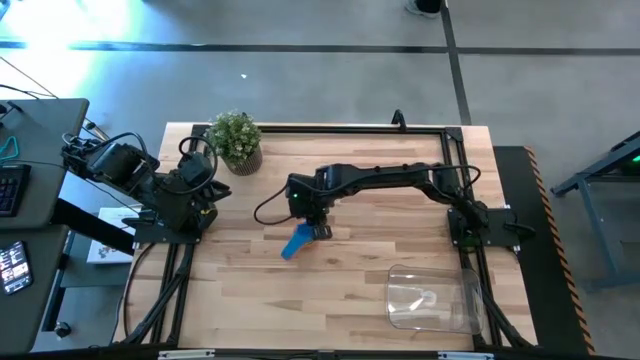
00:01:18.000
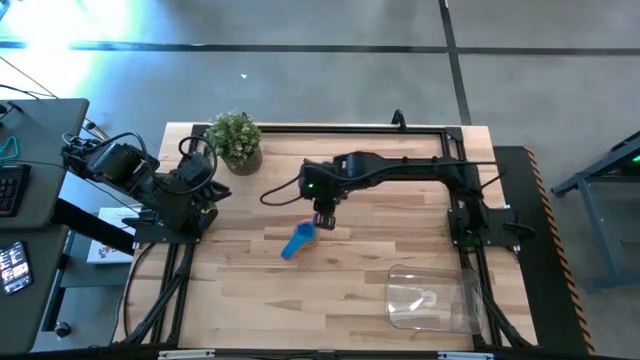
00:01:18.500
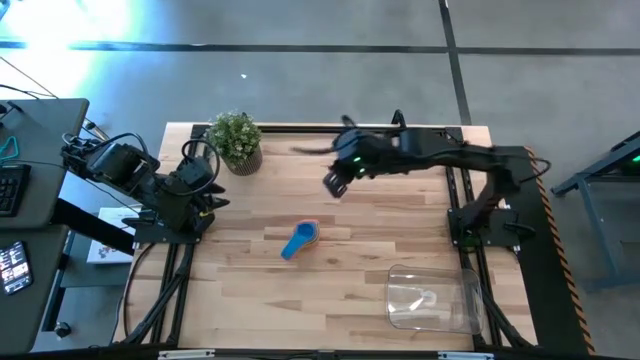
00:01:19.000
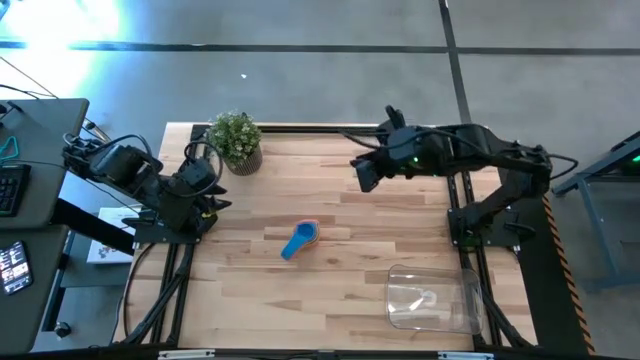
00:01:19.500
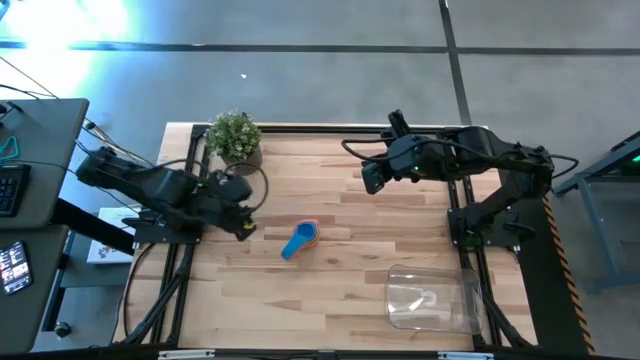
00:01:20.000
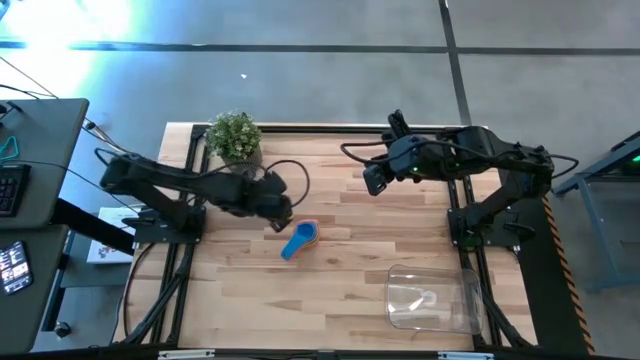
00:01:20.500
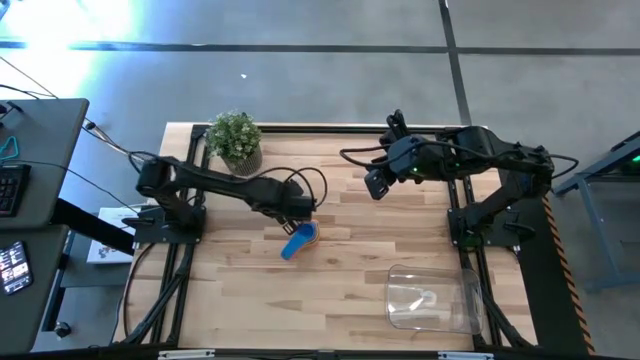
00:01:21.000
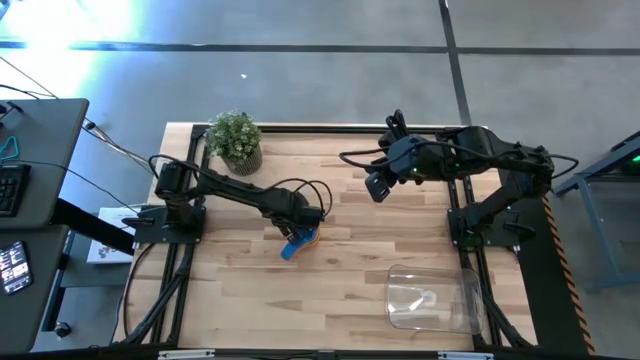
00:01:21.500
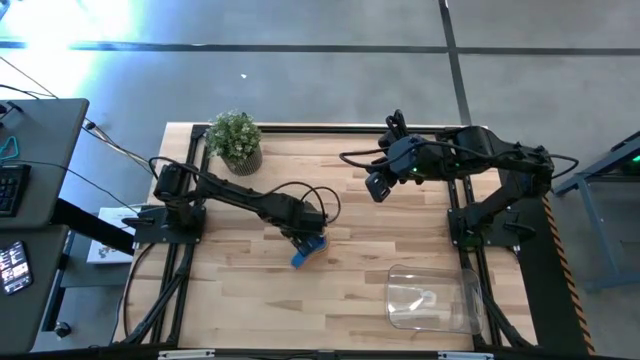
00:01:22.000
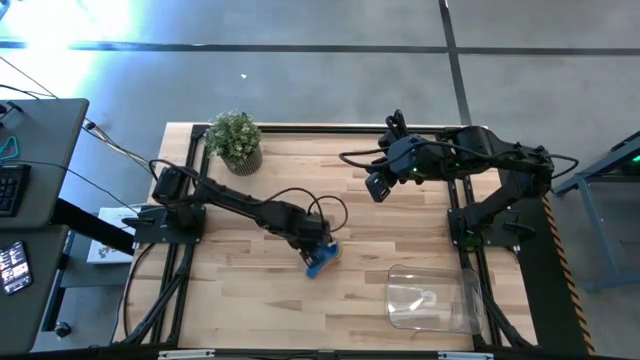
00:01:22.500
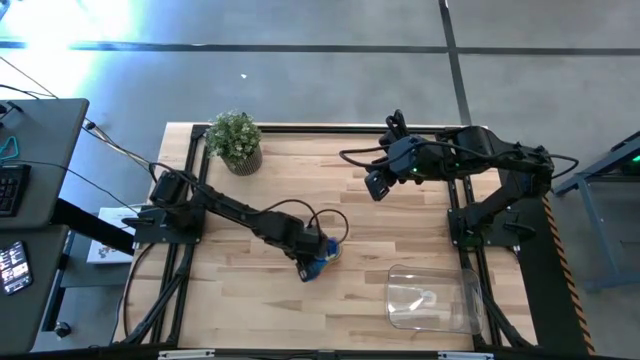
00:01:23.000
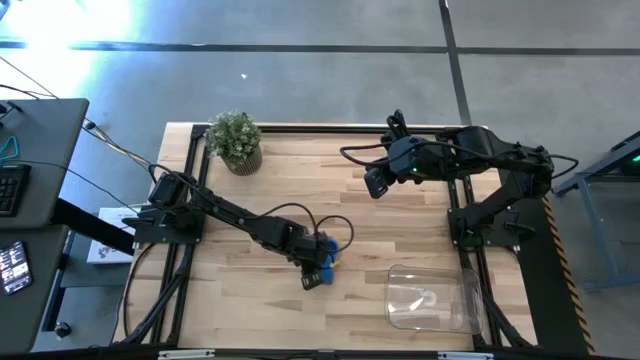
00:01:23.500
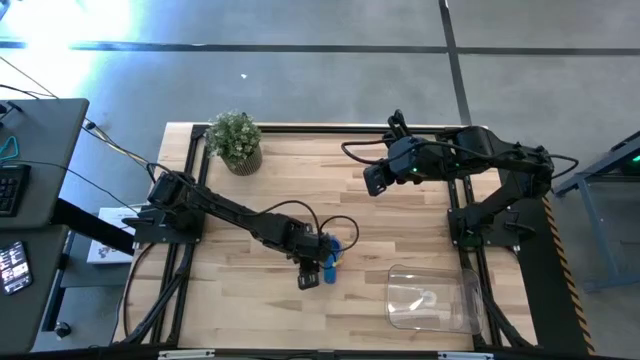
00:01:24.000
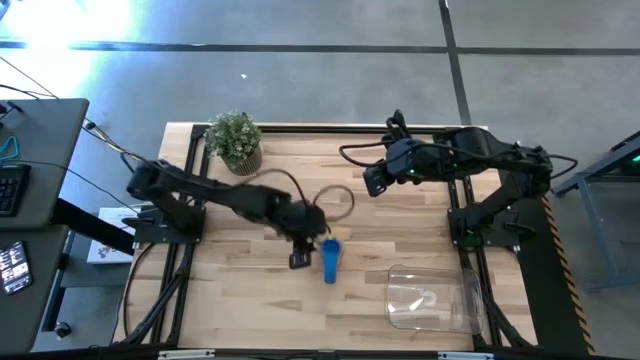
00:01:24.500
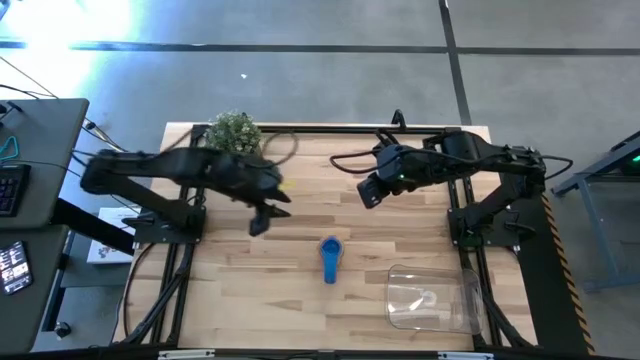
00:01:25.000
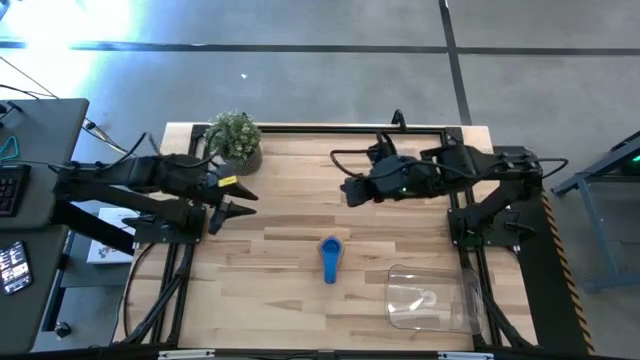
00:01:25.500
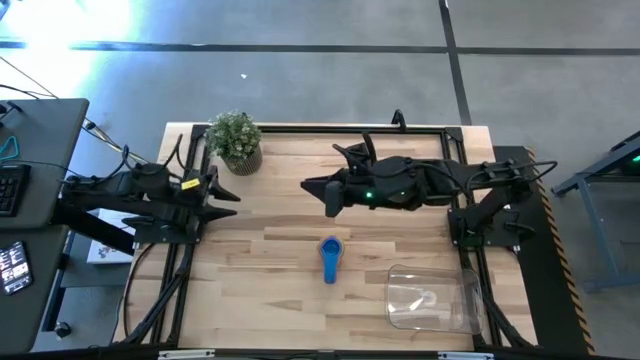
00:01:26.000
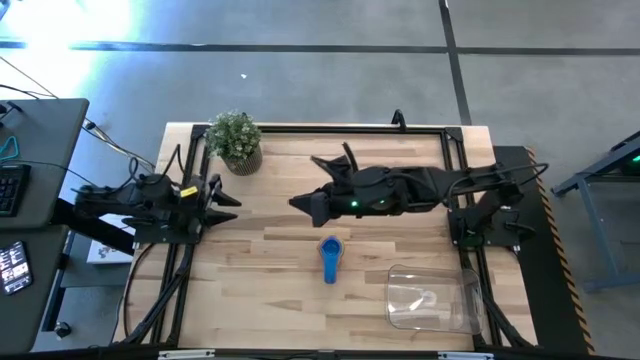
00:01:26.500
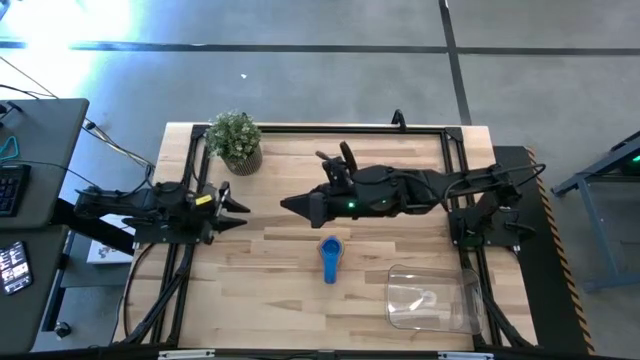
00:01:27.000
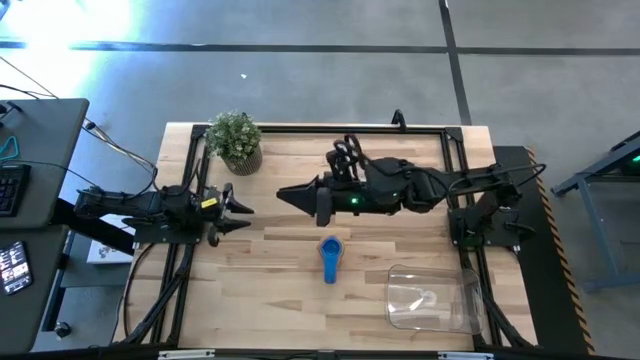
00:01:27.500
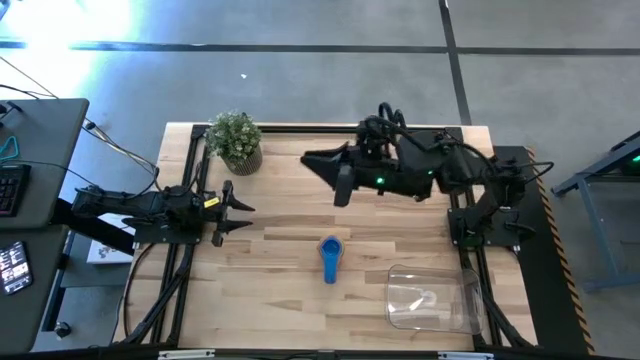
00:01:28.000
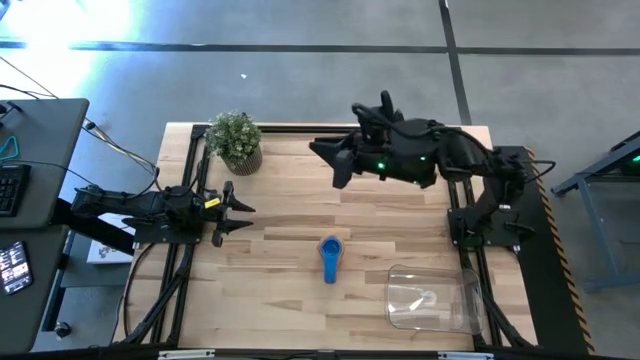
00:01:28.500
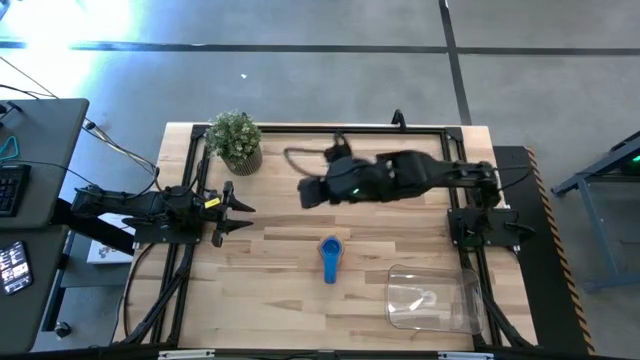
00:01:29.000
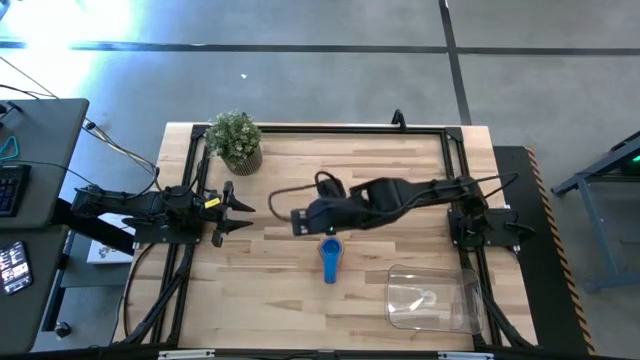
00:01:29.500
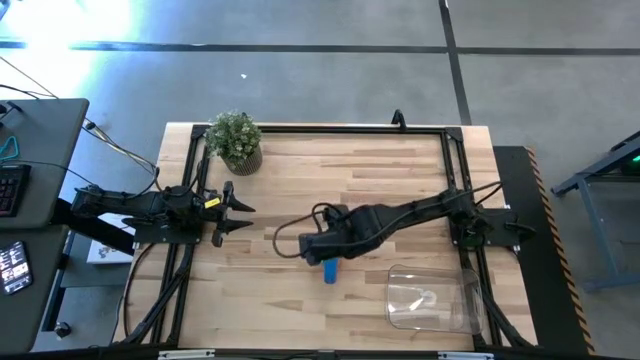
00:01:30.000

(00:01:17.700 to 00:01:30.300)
Task: Nest measuring cups in basket
Put the nested measuring cups into the transparent bin

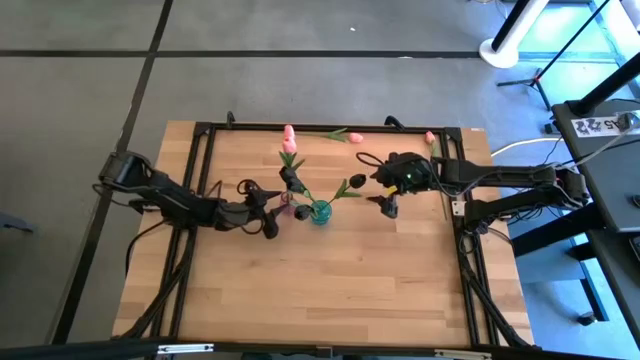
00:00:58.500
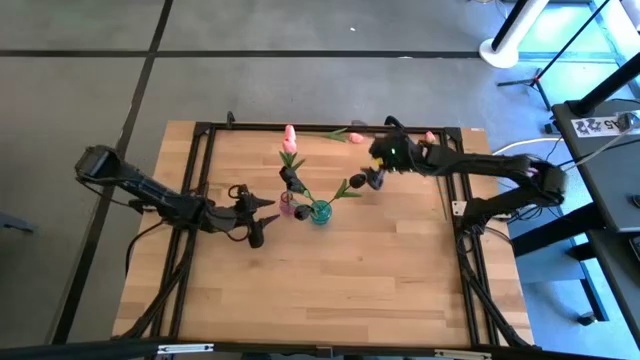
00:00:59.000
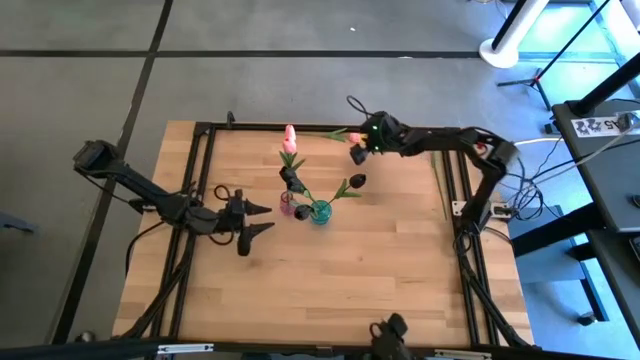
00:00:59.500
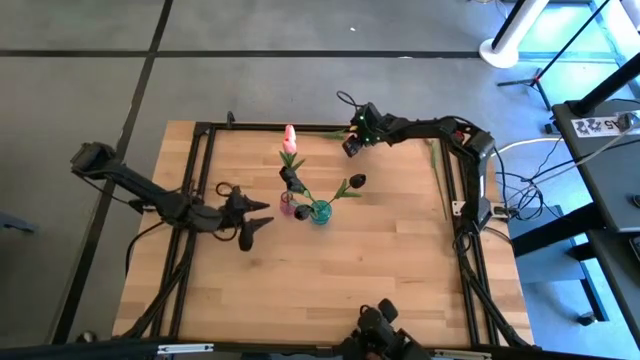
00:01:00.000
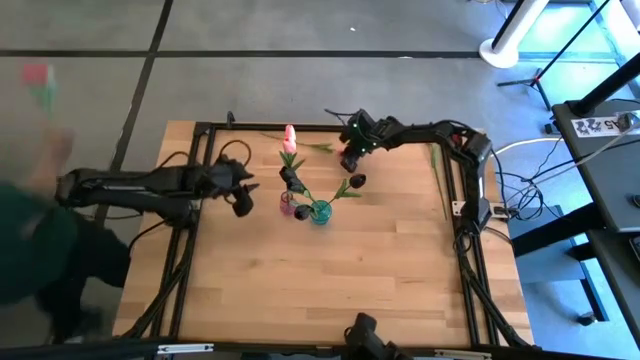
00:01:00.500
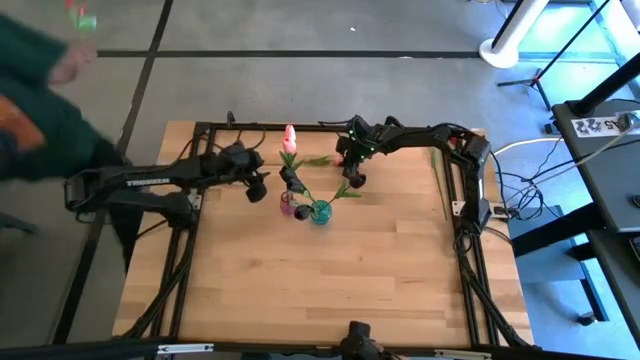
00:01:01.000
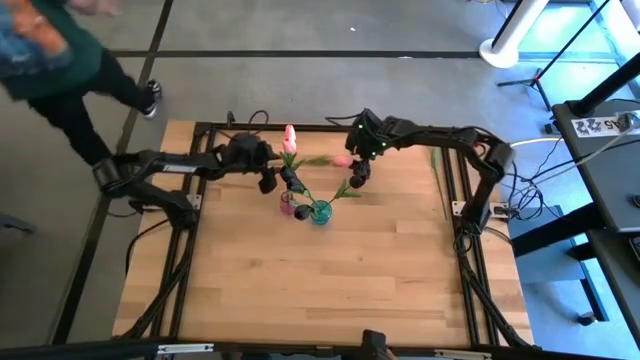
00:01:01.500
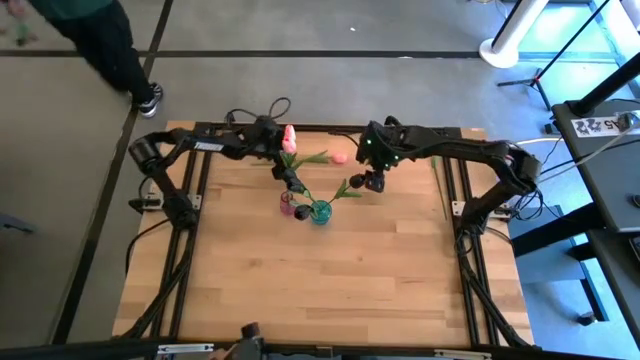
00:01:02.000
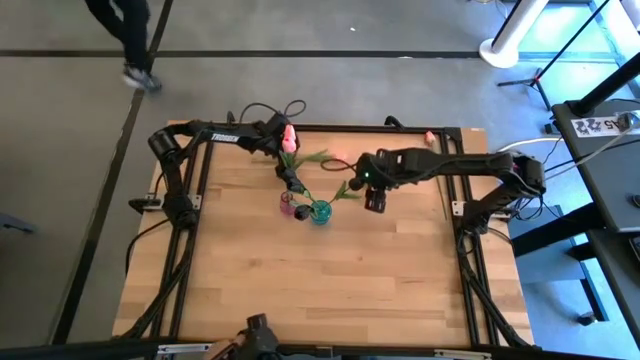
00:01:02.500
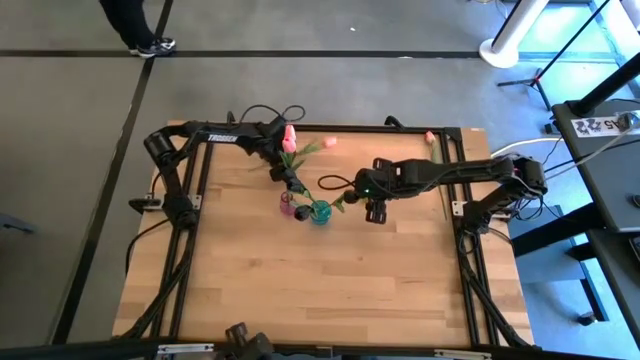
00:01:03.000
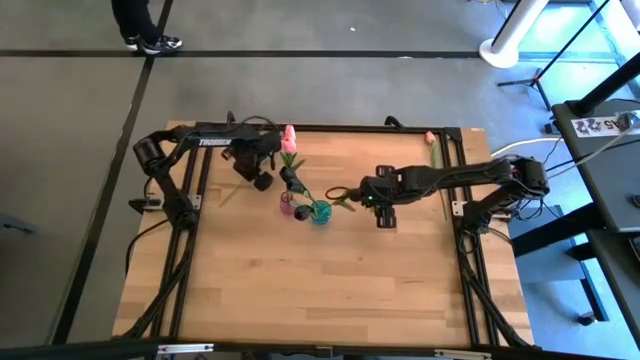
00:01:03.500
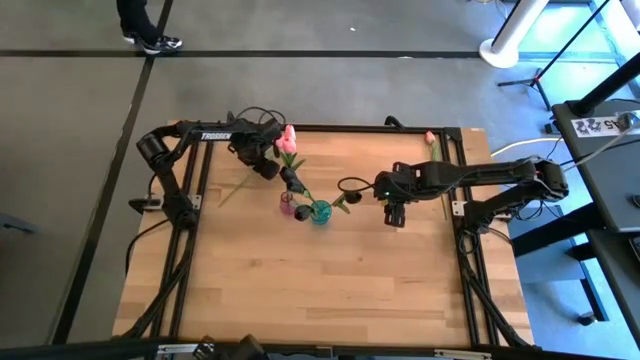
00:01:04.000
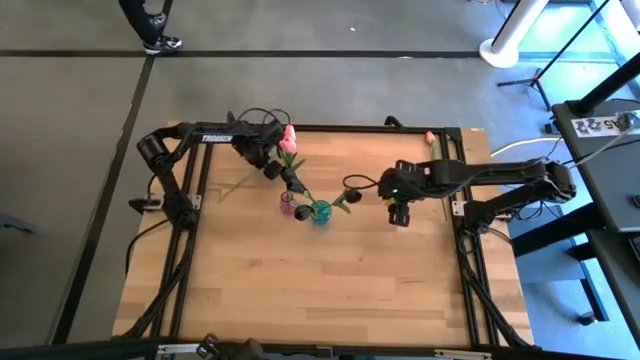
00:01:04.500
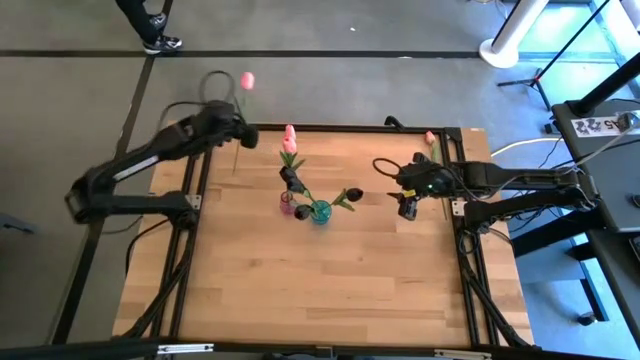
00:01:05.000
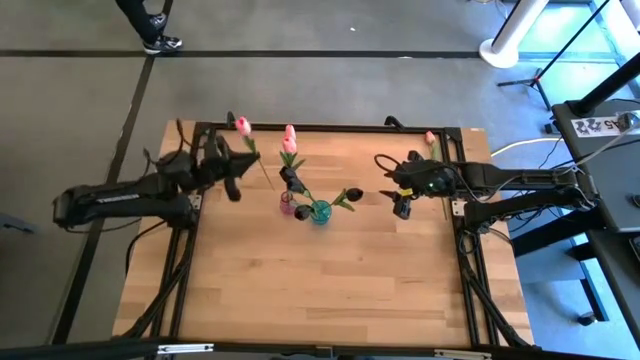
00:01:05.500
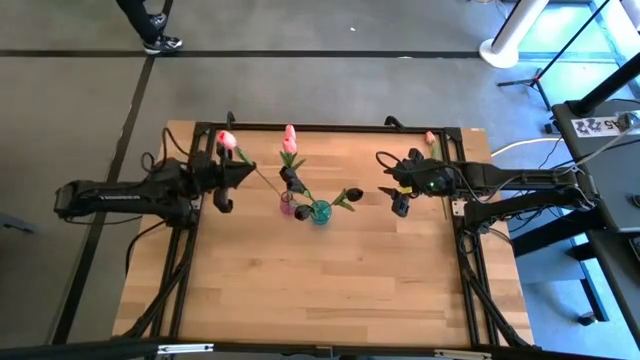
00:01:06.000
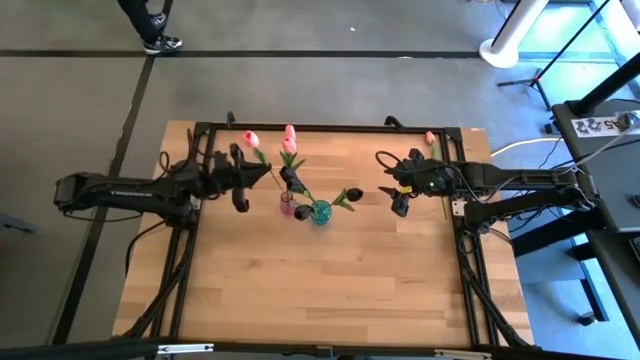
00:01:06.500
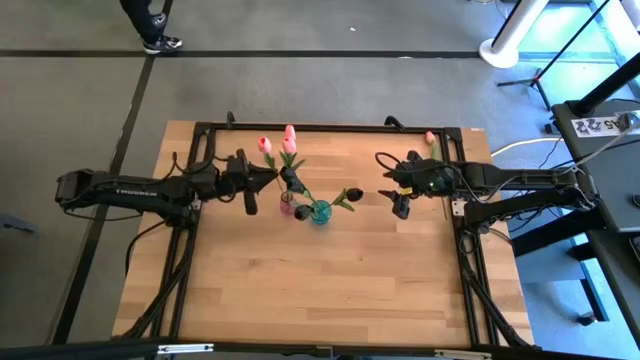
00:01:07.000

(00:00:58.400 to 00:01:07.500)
Task: Sort flowers into vase by color
Put the left pink tulip into the pink vase

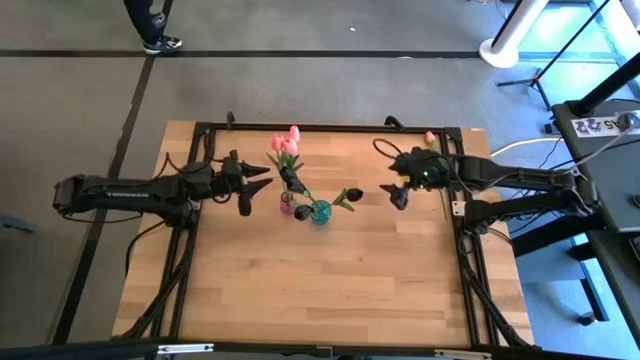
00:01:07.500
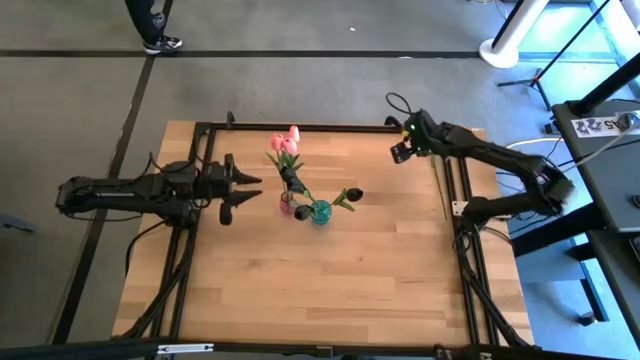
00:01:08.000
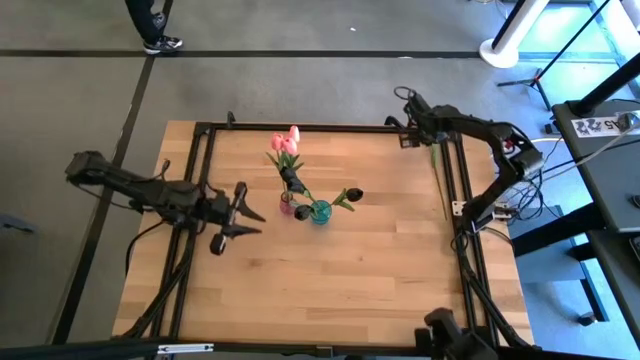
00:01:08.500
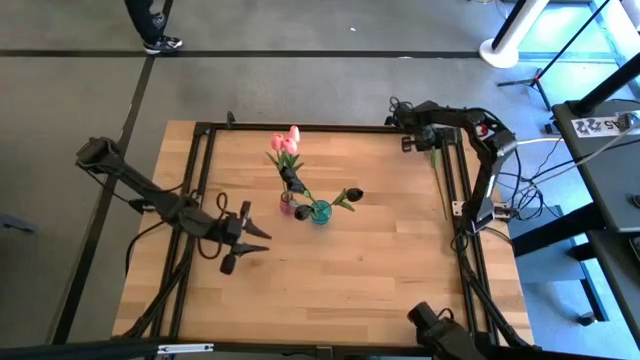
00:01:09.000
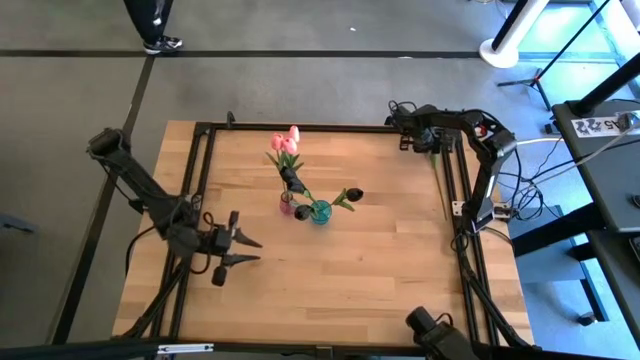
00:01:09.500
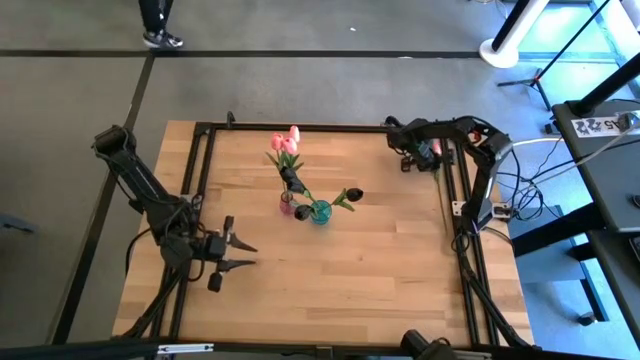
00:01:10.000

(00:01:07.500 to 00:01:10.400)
Put the pink tulip into the pink vase
